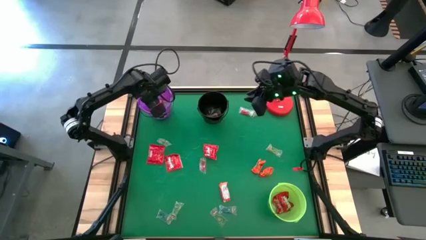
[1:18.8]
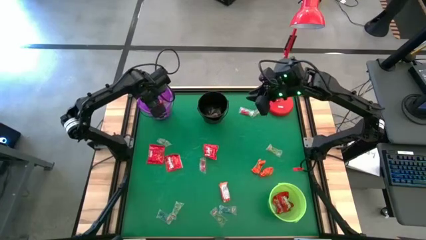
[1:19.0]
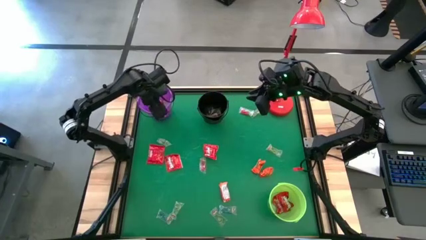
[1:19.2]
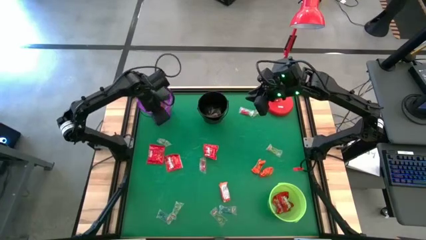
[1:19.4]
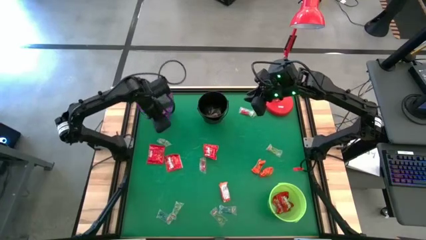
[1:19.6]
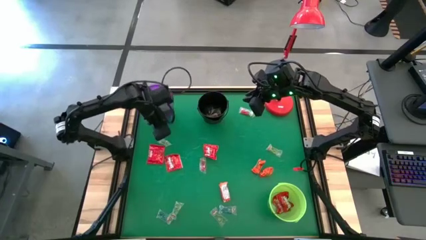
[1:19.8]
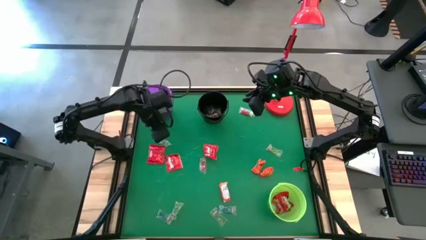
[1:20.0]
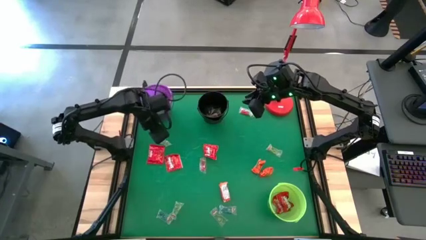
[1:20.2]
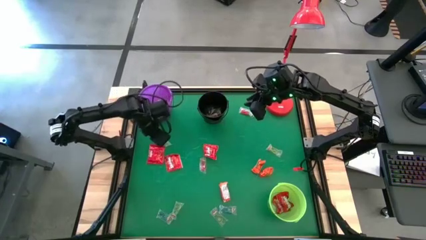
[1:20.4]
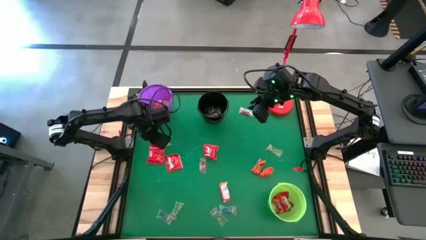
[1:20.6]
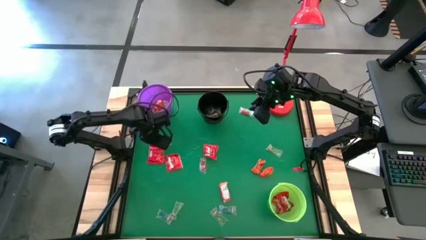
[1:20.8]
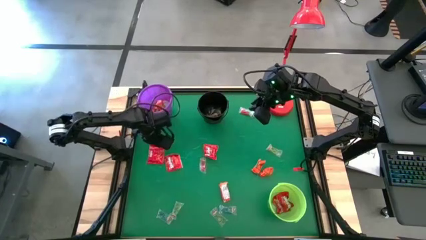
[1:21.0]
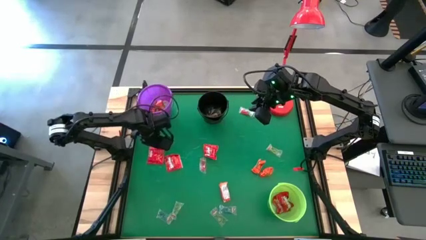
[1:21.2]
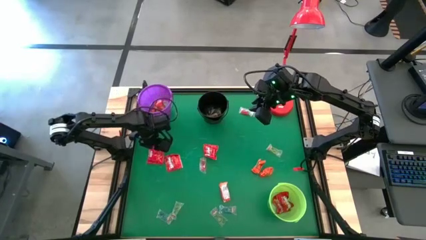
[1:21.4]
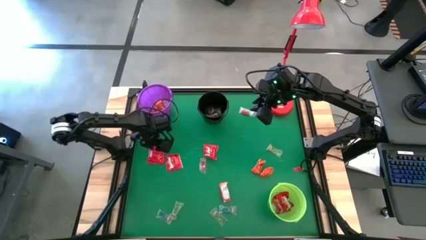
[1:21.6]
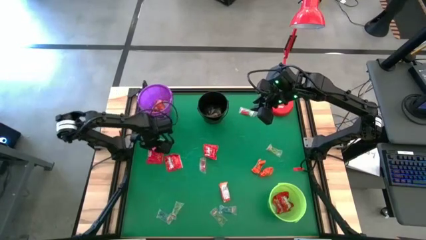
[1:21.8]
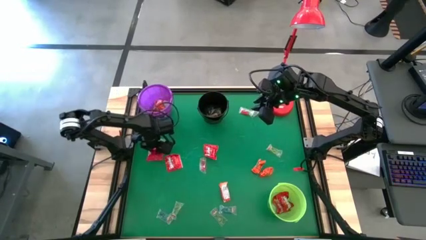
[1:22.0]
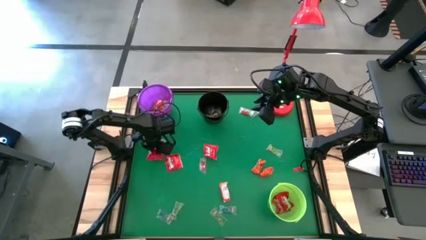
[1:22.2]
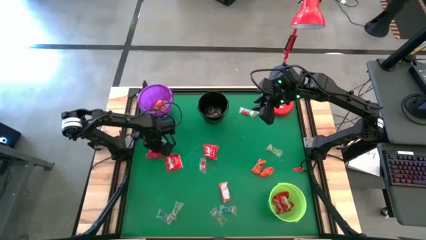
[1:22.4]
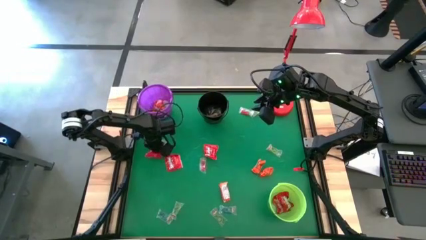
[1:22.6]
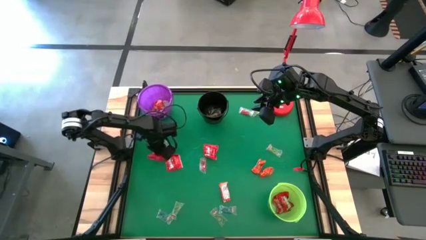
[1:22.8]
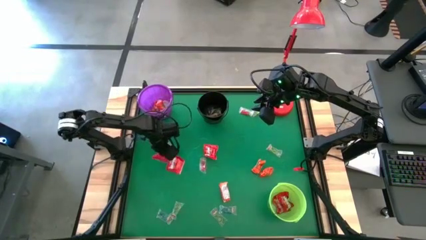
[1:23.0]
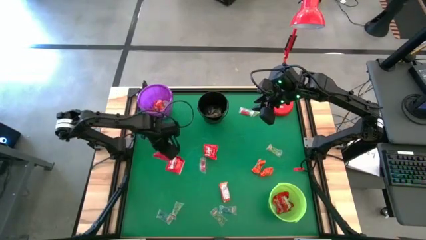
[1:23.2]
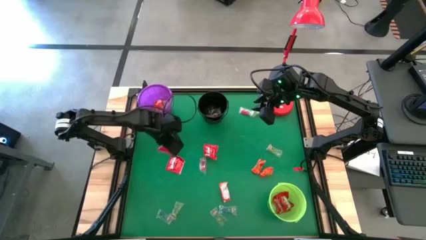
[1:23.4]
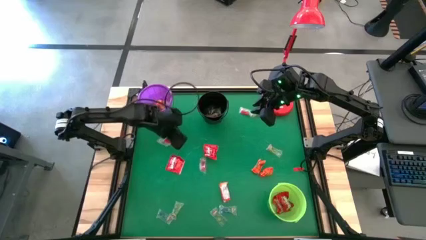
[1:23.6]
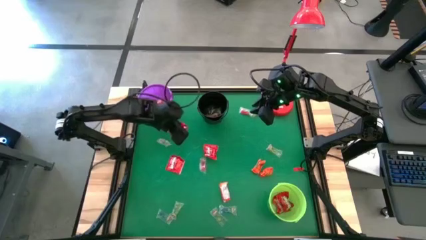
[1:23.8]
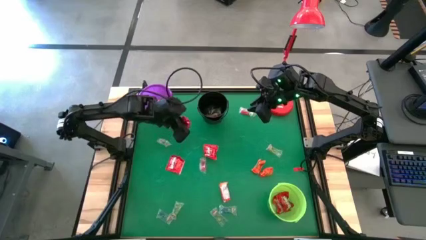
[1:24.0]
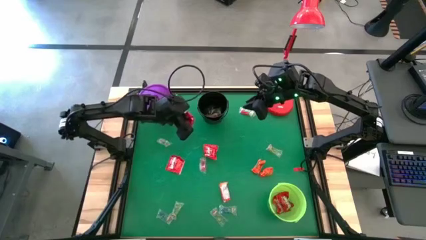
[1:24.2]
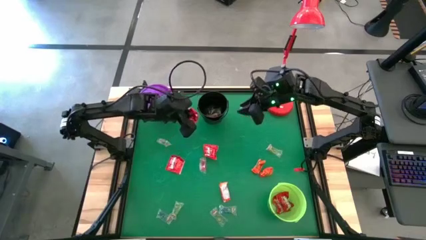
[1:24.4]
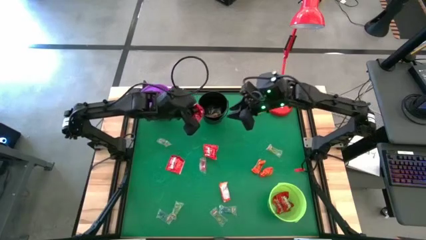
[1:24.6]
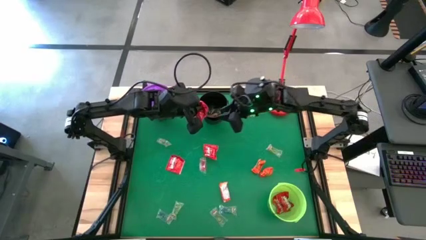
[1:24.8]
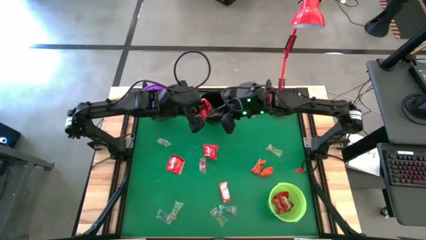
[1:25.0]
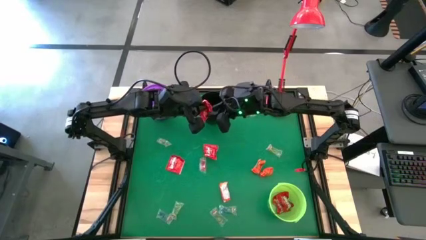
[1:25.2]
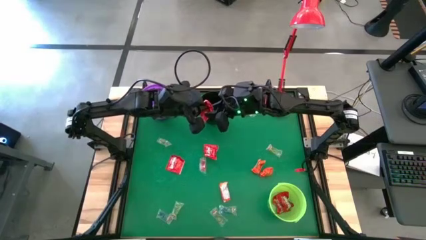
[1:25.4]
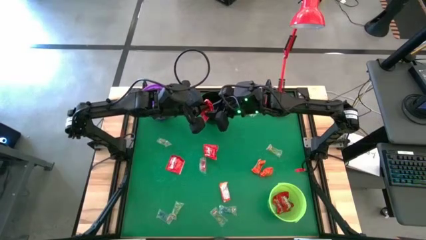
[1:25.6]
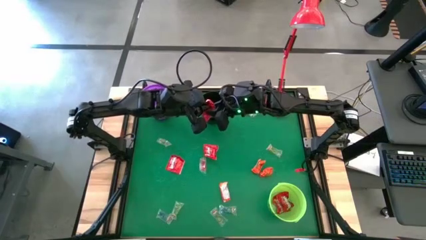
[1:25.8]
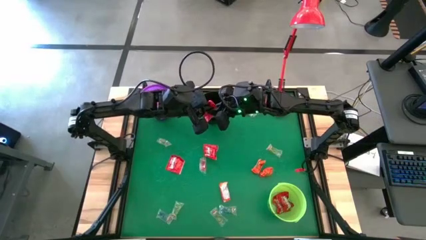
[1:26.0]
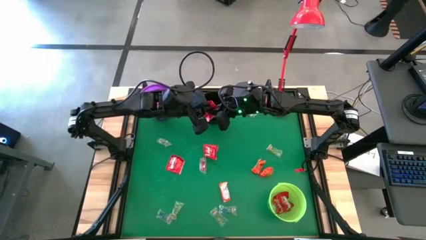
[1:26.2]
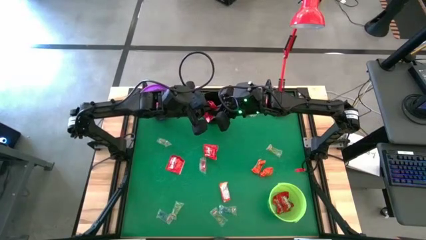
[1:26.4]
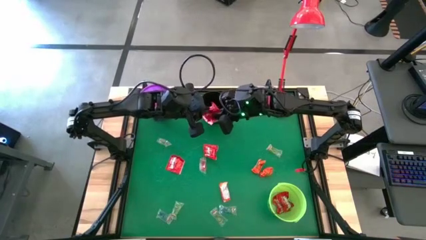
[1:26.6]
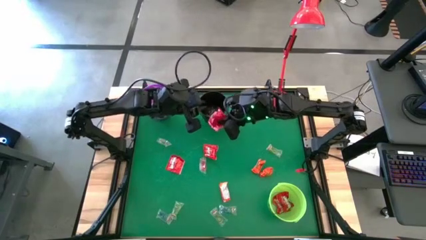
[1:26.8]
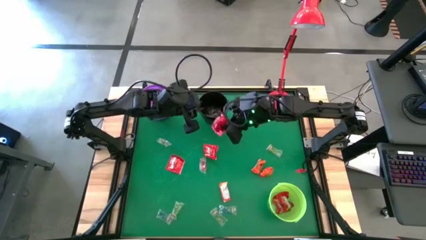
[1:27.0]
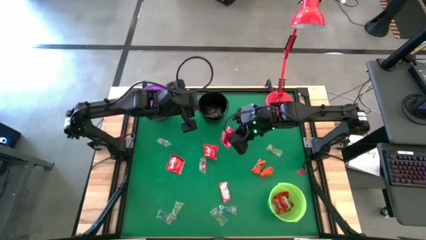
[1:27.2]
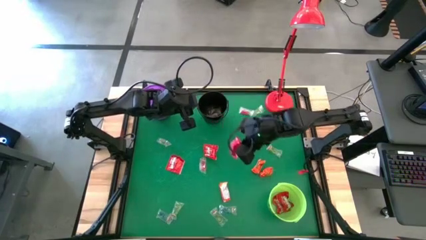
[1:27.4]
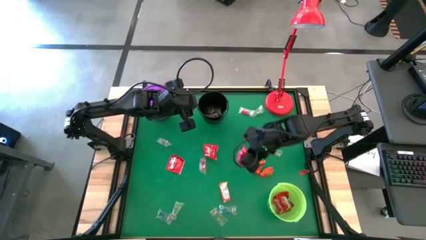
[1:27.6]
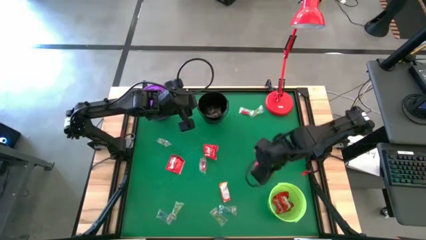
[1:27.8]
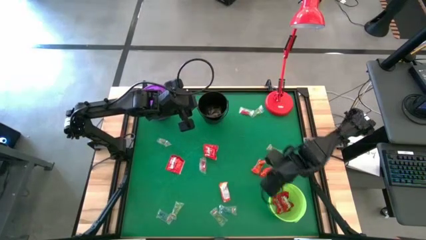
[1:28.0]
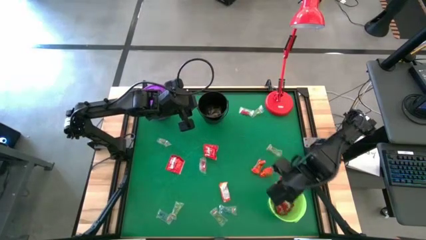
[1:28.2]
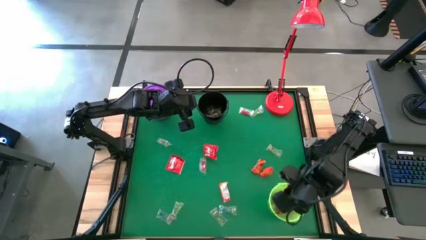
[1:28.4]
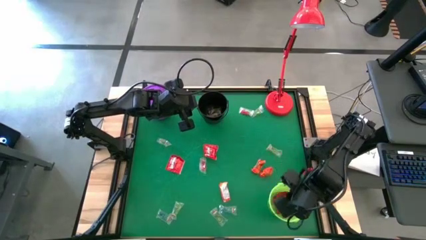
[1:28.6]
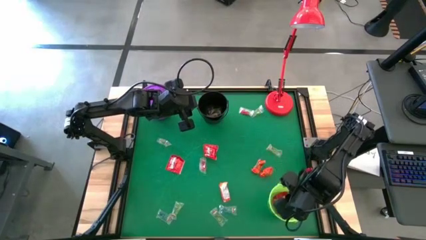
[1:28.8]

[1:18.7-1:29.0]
Task: Sort candy
Put the left red candy into the green bucket
